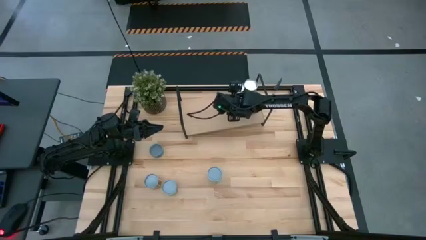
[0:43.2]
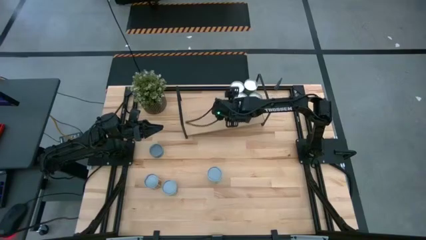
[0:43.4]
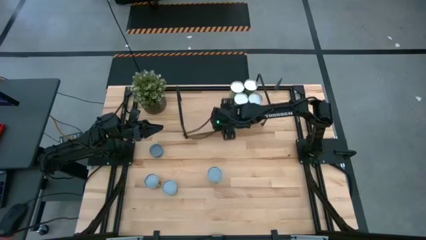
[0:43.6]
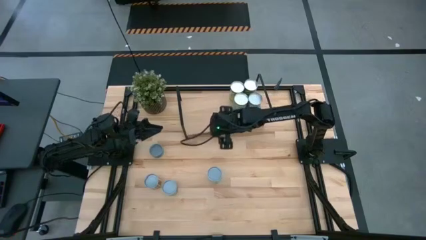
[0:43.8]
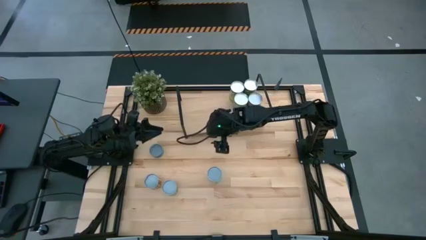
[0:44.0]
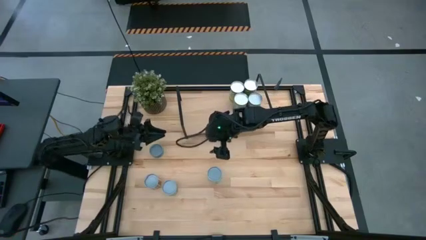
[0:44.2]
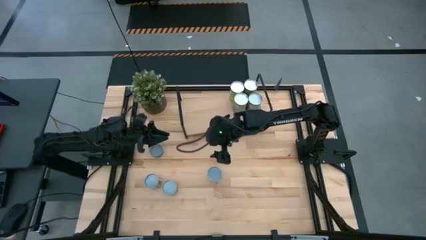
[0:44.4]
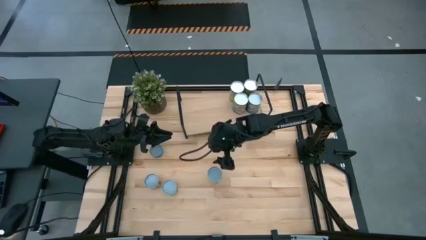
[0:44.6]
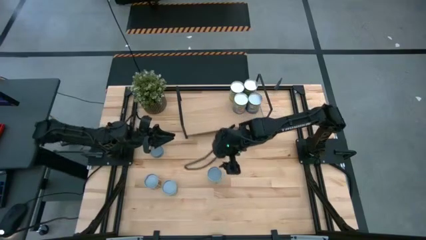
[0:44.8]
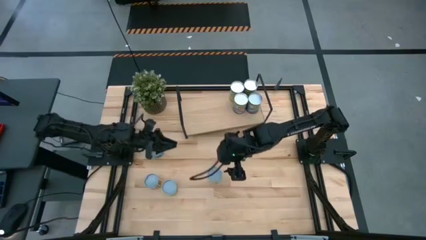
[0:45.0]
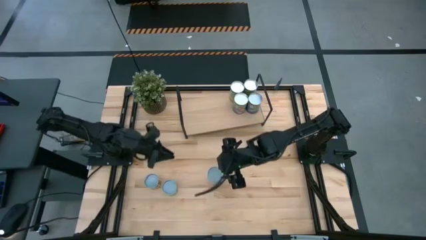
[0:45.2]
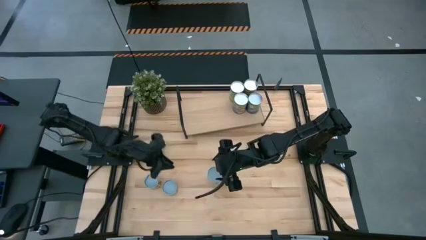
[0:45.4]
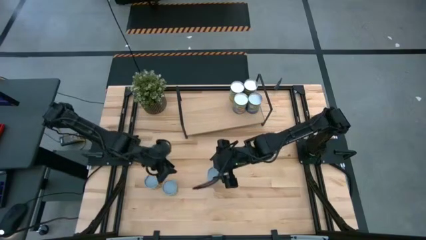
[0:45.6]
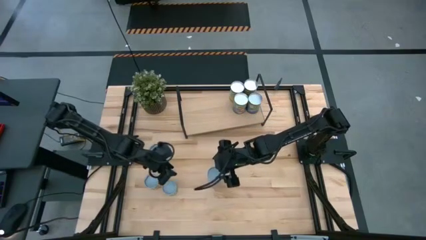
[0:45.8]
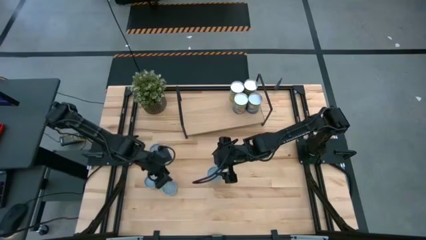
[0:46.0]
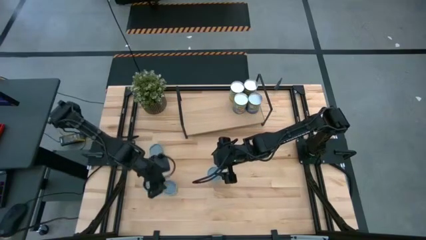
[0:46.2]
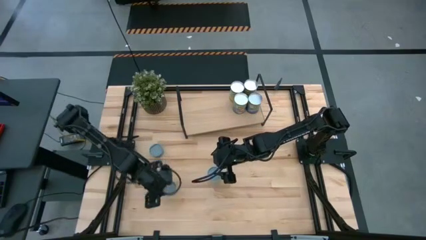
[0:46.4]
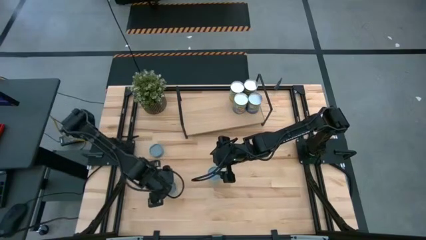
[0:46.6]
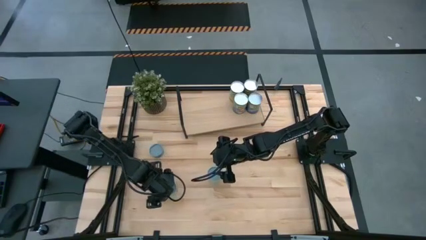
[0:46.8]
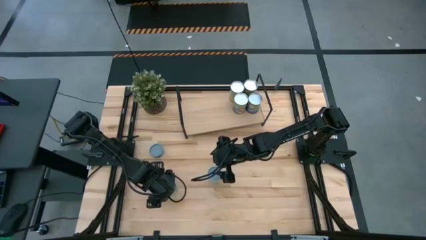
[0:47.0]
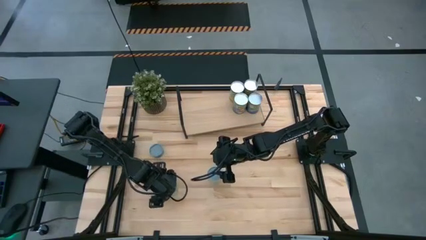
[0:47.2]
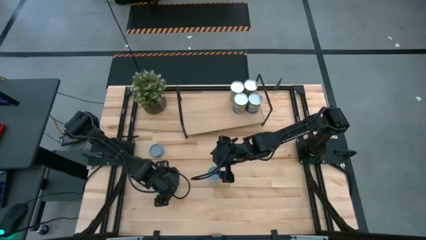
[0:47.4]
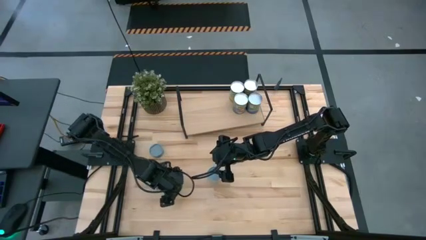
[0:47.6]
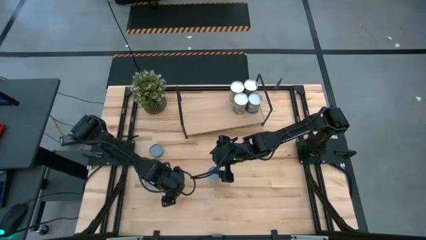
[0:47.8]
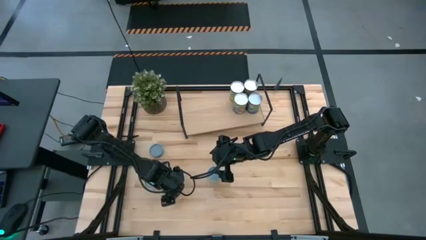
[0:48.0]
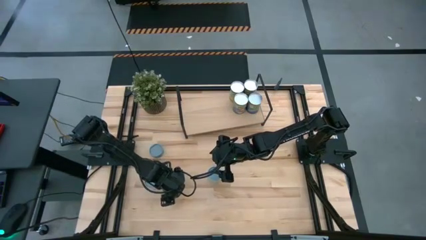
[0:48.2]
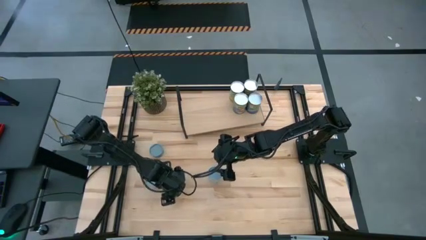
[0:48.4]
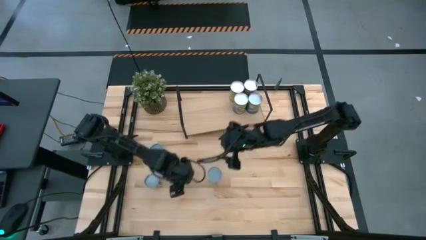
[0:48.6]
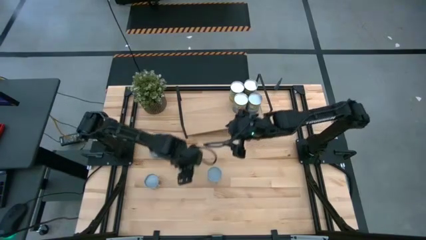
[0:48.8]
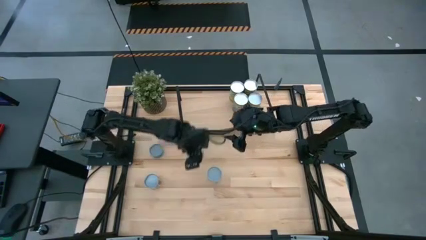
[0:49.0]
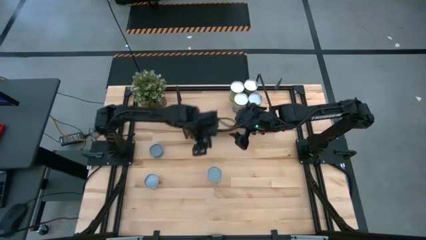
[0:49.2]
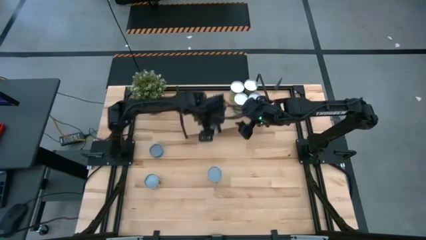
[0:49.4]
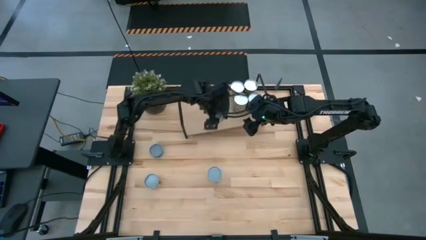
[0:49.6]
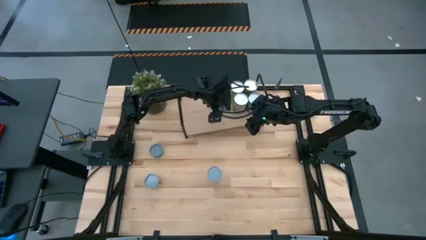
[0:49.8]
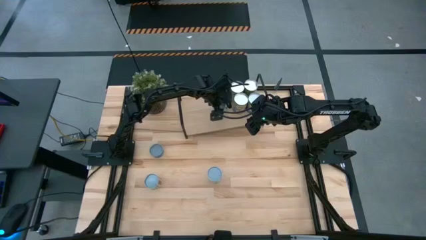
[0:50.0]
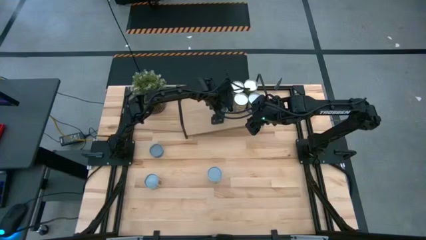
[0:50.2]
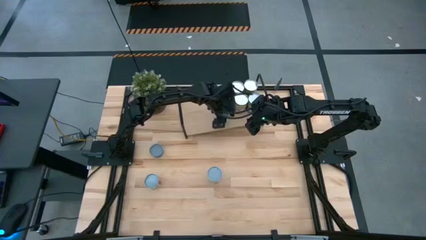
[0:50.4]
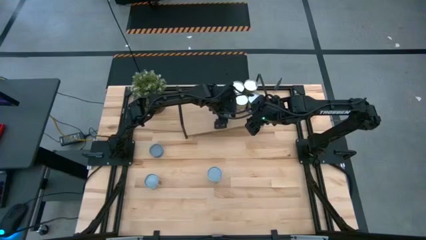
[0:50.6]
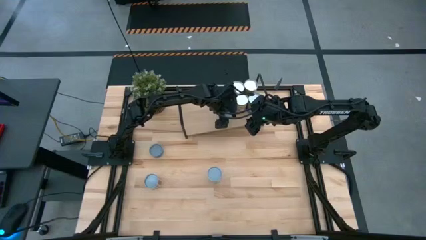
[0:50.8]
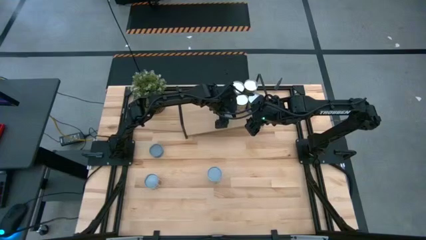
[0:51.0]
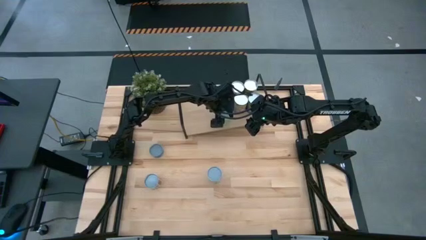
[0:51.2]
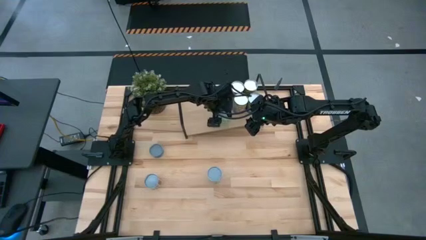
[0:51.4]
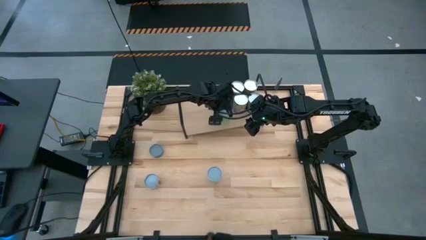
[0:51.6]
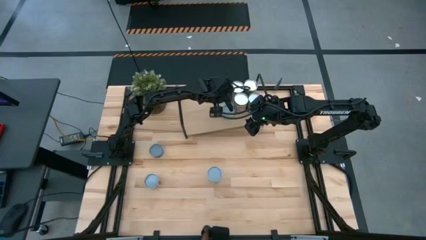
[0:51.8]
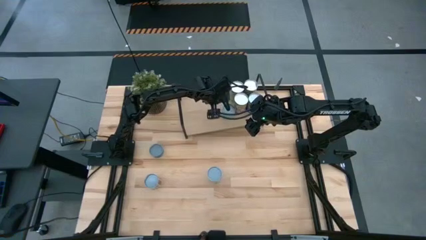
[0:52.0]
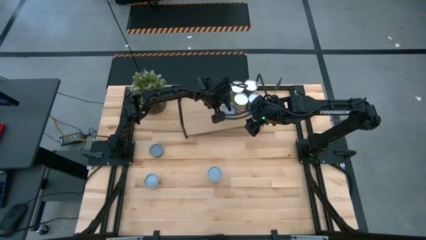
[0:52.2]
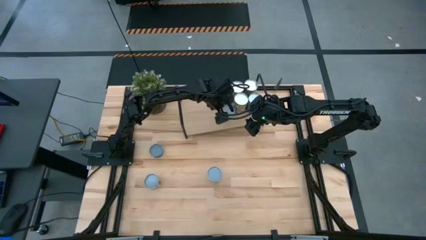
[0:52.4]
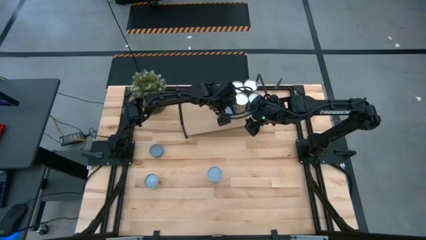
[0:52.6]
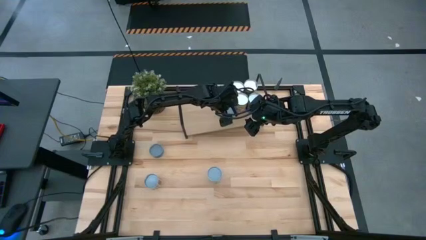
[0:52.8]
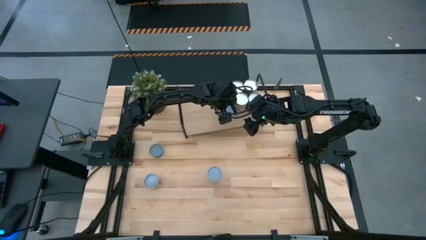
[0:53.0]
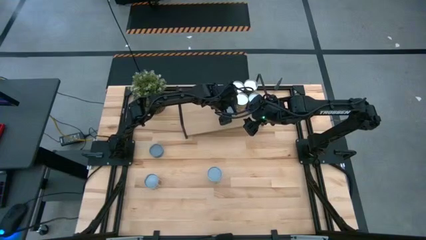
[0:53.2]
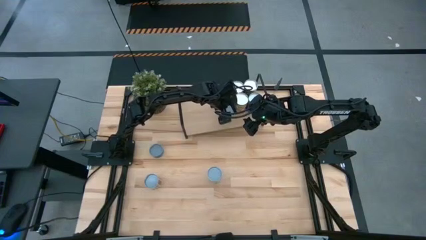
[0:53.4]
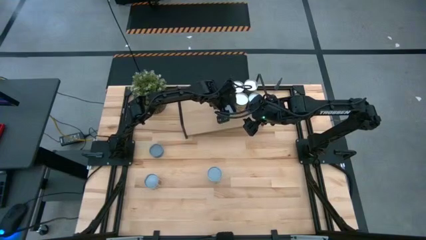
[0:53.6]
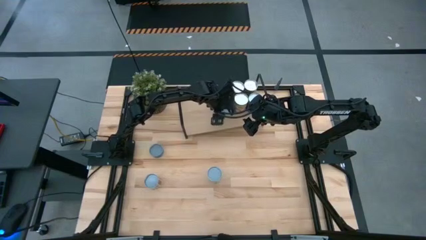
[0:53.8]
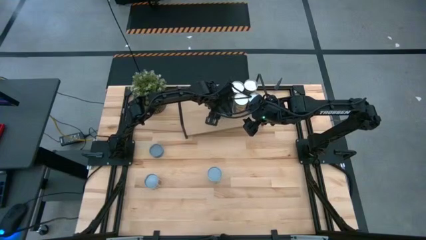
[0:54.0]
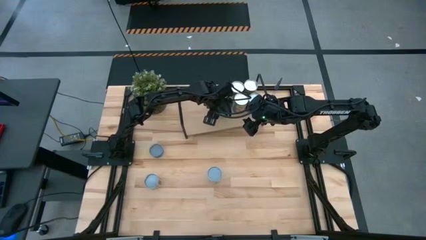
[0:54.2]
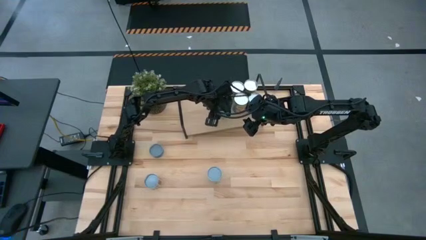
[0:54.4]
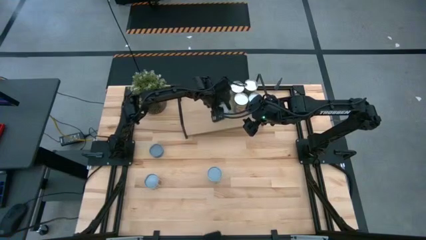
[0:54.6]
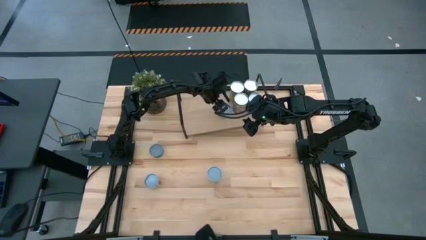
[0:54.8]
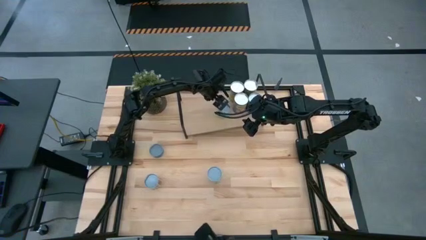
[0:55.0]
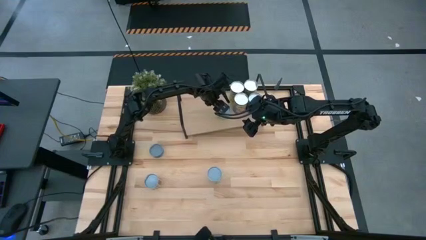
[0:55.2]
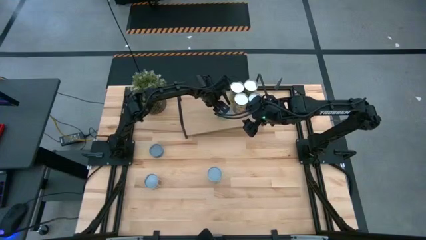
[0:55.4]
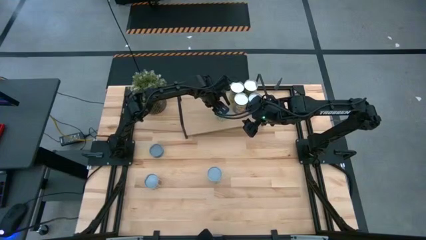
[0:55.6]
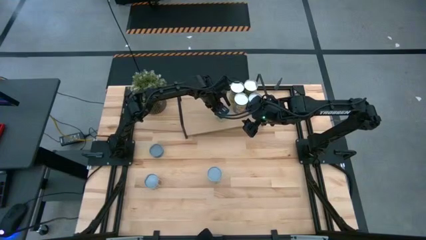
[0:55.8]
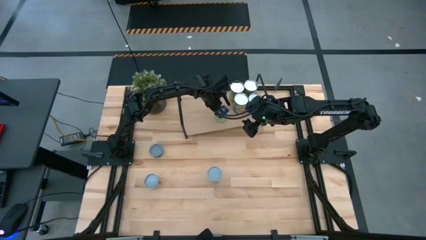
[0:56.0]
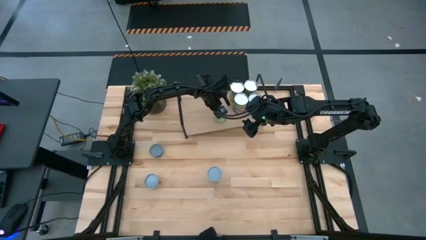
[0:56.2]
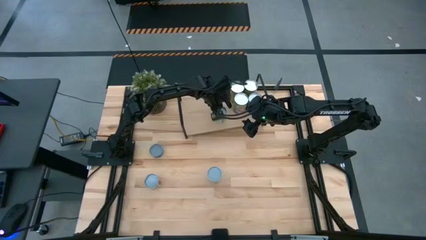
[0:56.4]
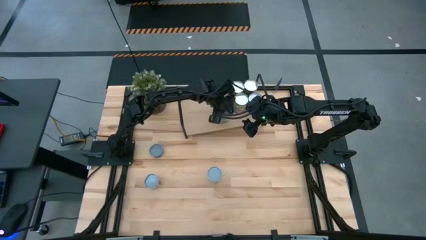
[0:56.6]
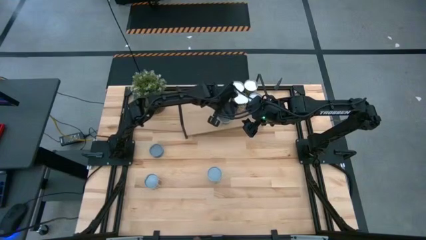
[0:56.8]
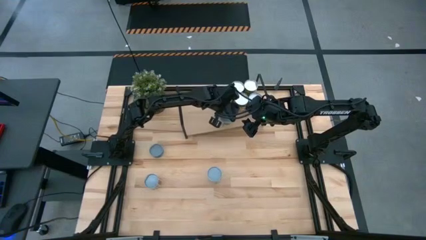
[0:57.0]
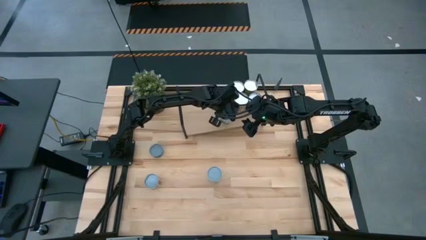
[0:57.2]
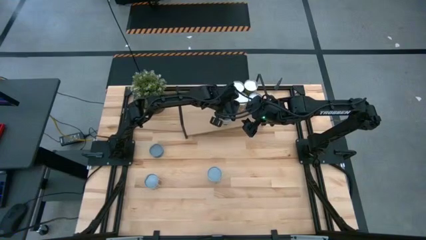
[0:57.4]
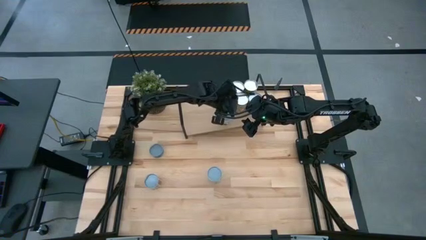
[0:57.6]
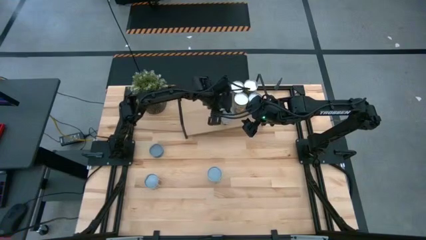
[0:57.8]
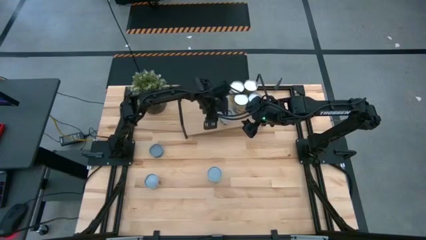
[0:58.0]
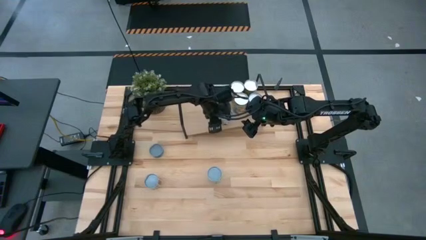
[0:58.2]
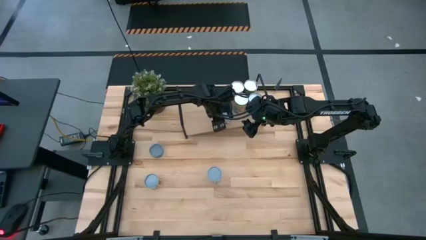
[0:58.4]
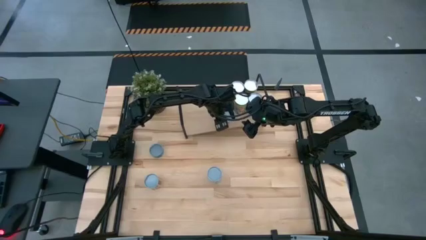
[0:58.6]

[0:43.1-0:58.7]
Task: Pick and place cans onto a shelf
Put the canned green peas on the shelf

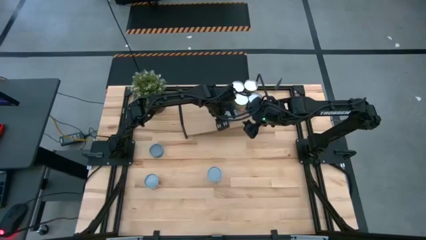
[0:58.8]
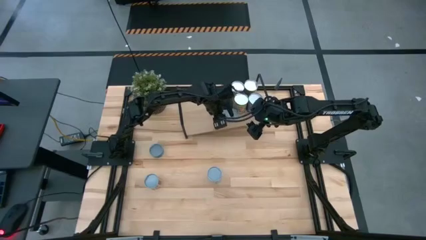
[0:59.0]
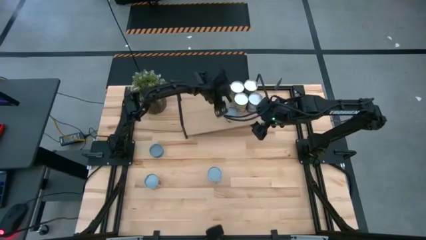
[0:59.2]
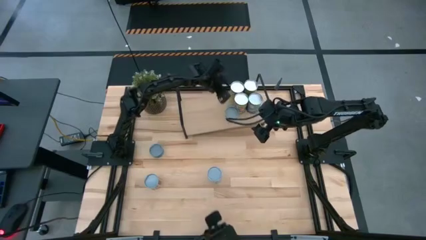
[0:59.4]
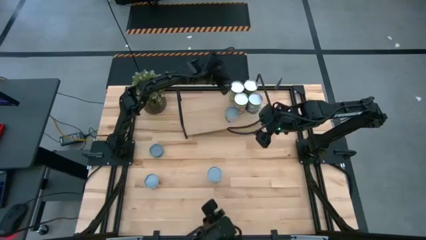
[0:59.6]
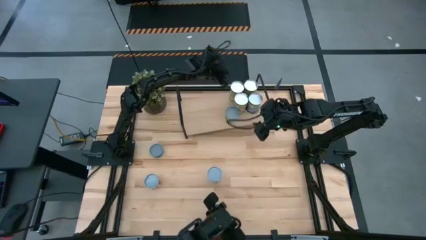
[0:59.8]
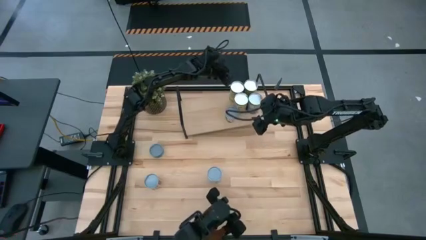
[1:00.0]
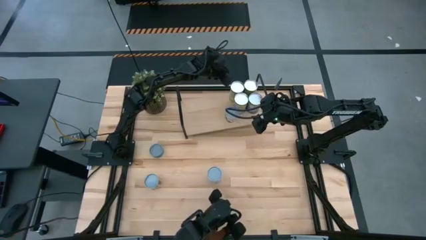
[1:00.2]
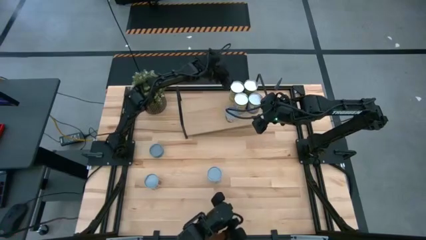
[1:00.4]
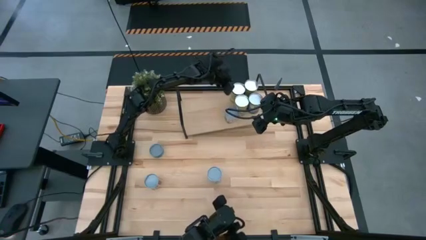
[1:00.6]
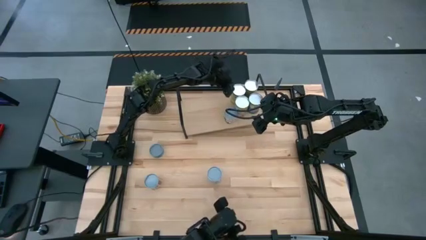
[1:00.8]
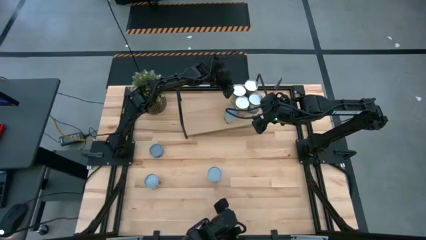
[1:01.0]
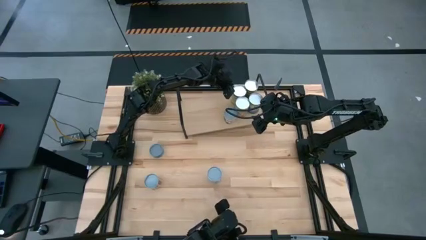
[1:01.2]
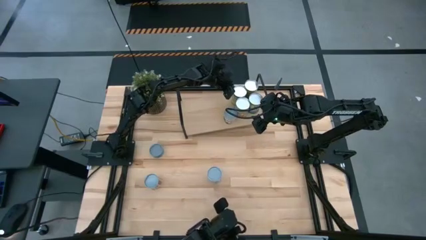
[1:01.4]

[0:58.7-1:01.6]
Adjust the cans on the shelf
